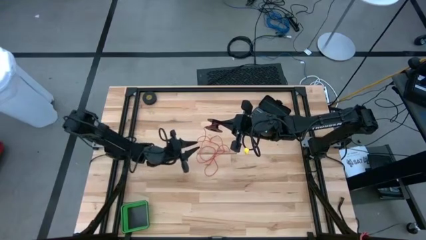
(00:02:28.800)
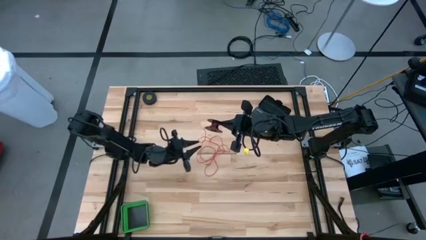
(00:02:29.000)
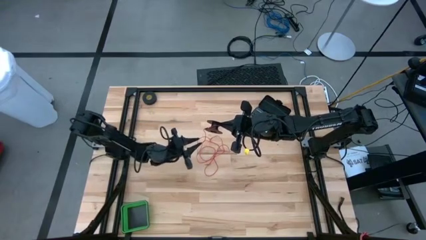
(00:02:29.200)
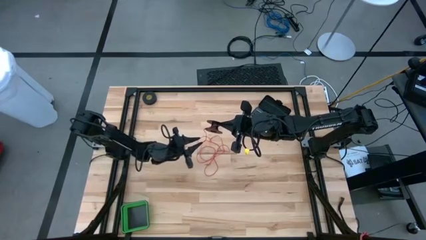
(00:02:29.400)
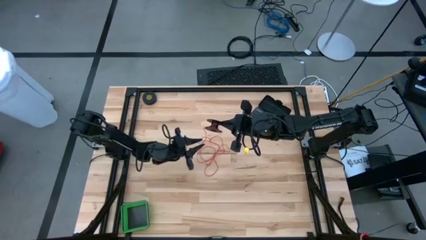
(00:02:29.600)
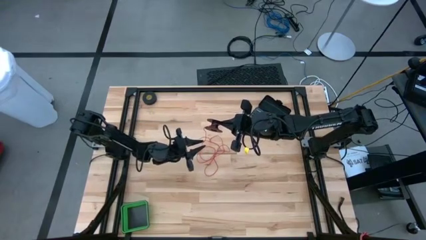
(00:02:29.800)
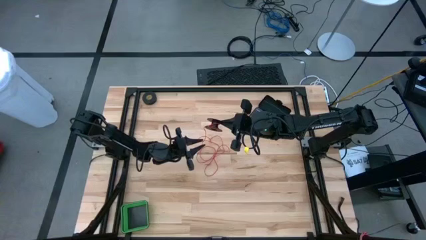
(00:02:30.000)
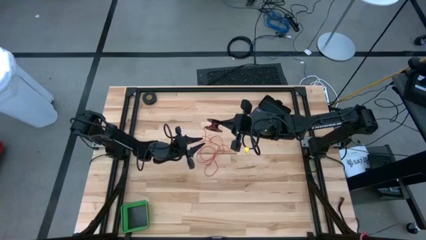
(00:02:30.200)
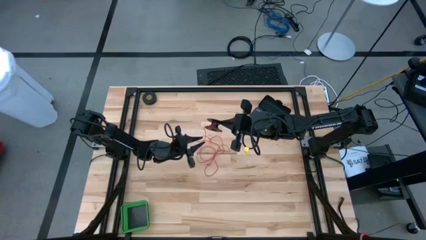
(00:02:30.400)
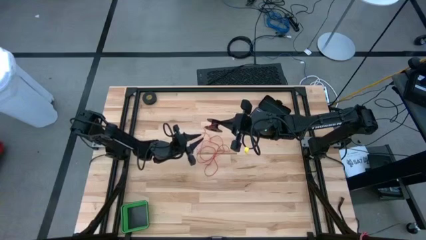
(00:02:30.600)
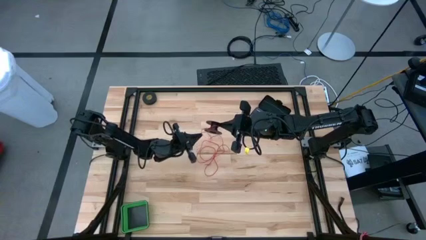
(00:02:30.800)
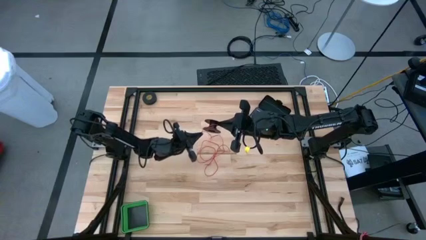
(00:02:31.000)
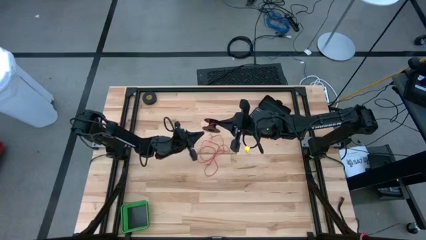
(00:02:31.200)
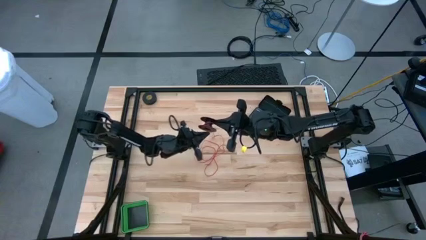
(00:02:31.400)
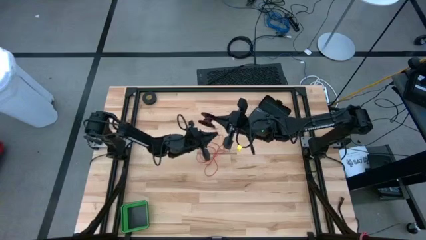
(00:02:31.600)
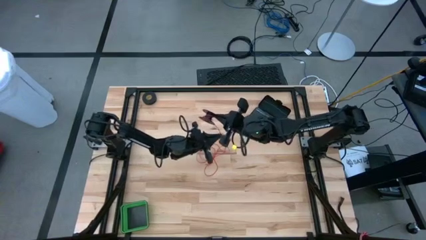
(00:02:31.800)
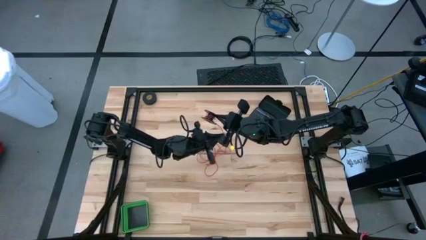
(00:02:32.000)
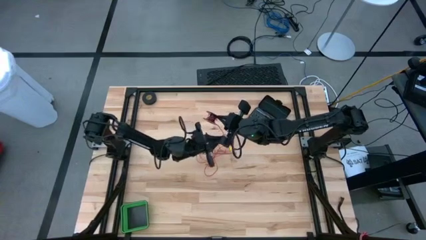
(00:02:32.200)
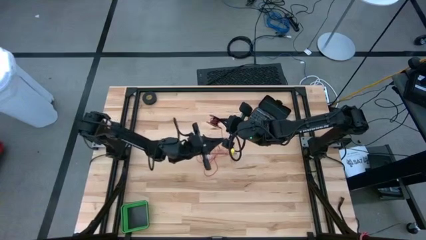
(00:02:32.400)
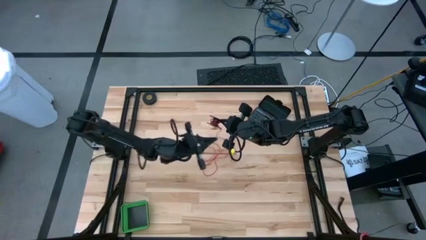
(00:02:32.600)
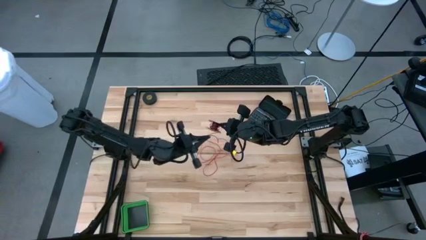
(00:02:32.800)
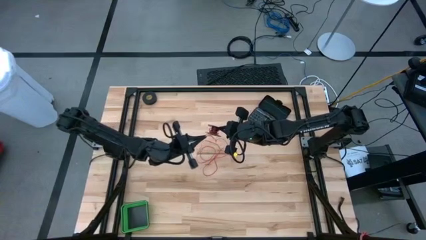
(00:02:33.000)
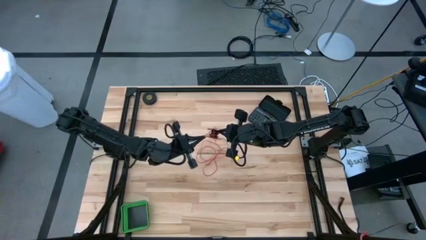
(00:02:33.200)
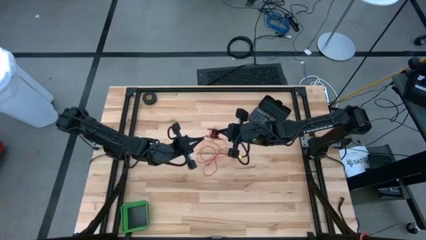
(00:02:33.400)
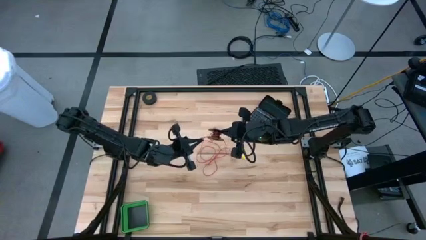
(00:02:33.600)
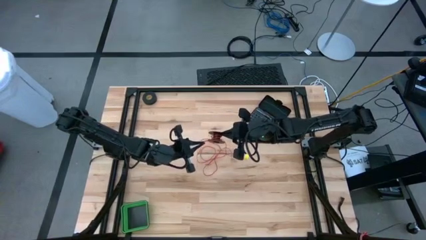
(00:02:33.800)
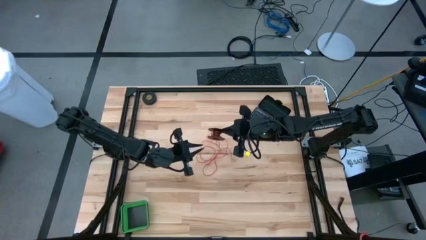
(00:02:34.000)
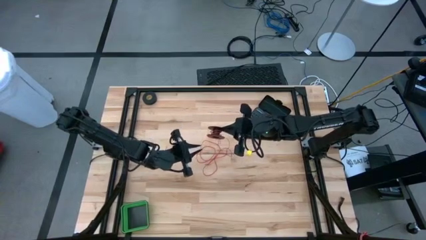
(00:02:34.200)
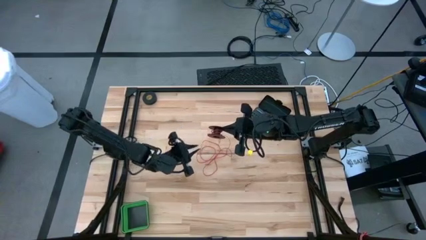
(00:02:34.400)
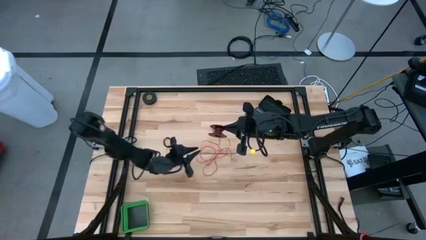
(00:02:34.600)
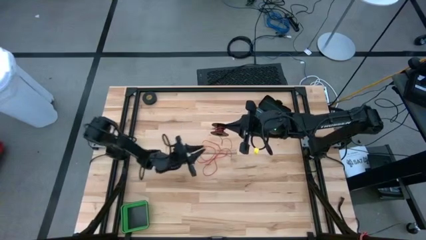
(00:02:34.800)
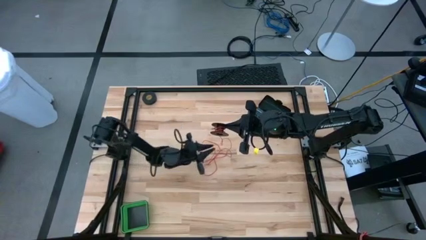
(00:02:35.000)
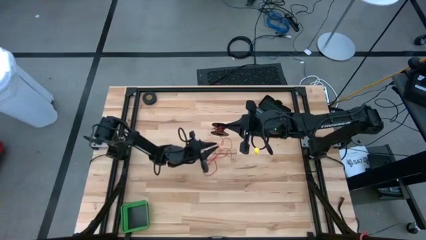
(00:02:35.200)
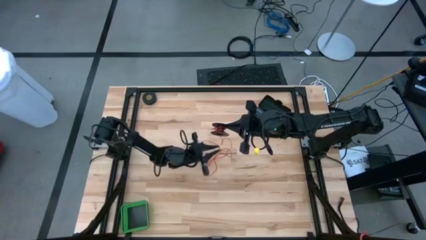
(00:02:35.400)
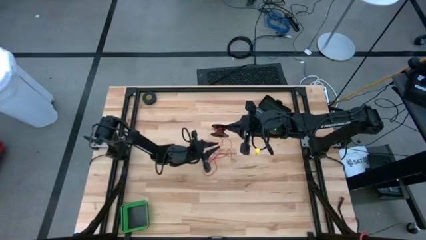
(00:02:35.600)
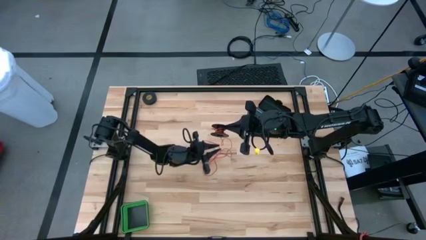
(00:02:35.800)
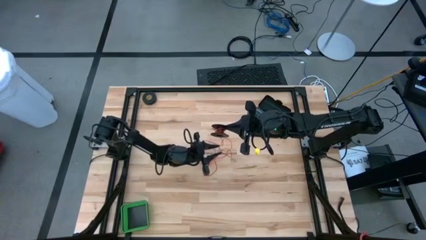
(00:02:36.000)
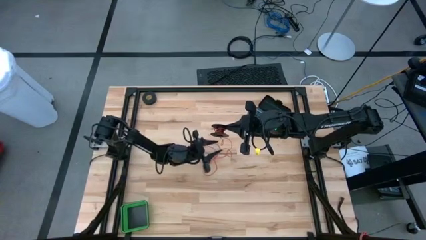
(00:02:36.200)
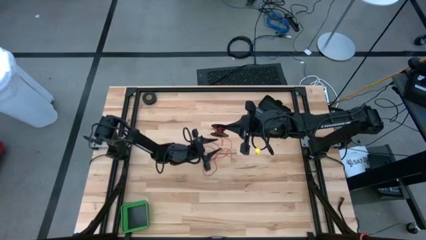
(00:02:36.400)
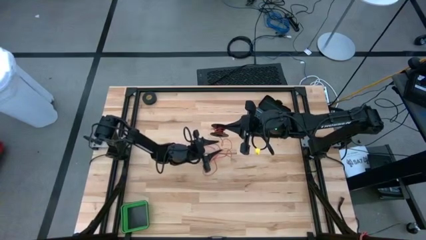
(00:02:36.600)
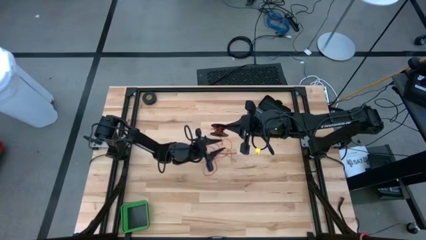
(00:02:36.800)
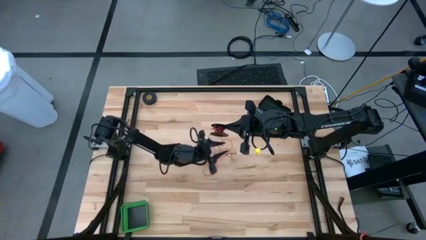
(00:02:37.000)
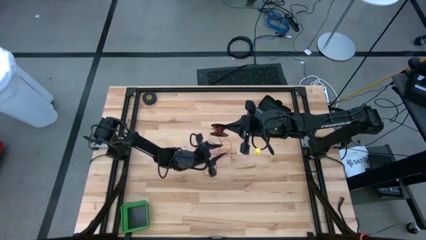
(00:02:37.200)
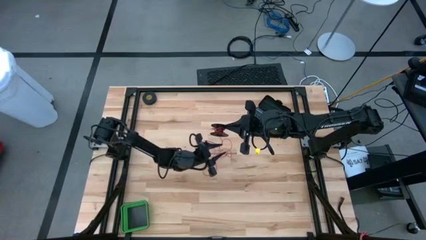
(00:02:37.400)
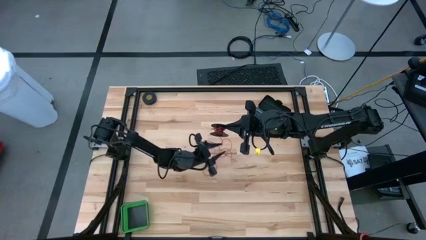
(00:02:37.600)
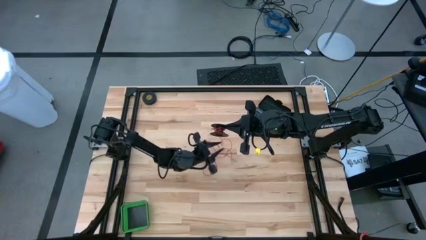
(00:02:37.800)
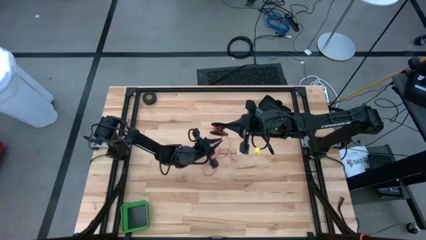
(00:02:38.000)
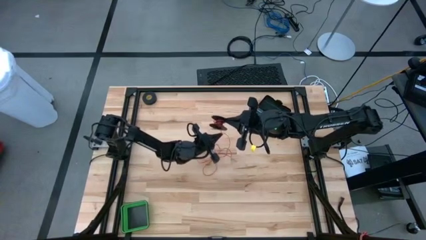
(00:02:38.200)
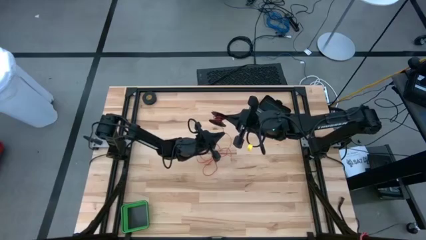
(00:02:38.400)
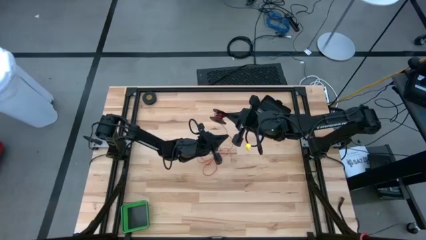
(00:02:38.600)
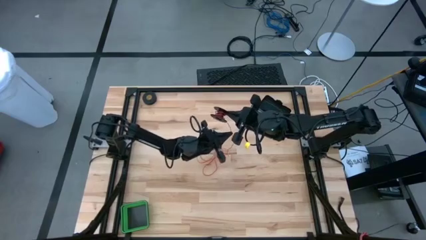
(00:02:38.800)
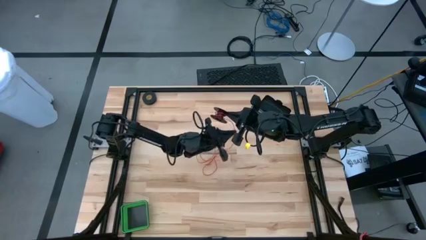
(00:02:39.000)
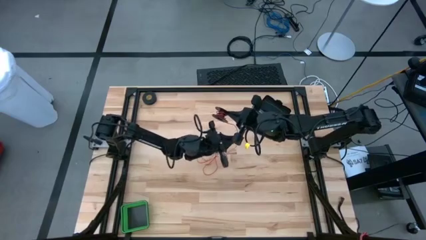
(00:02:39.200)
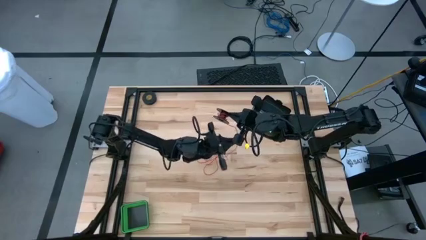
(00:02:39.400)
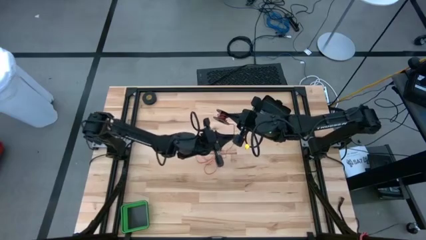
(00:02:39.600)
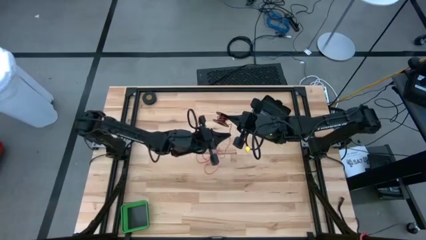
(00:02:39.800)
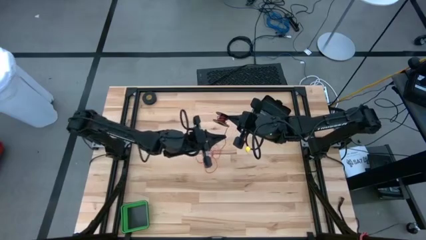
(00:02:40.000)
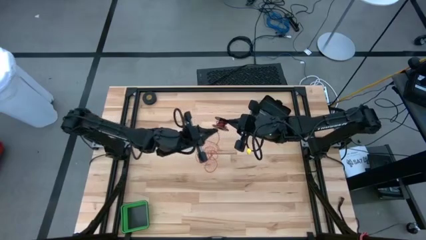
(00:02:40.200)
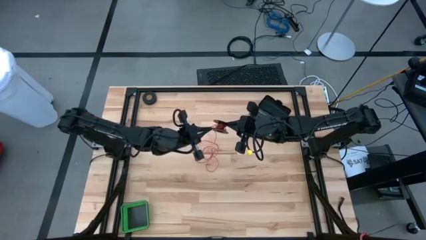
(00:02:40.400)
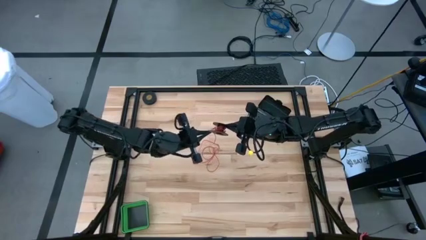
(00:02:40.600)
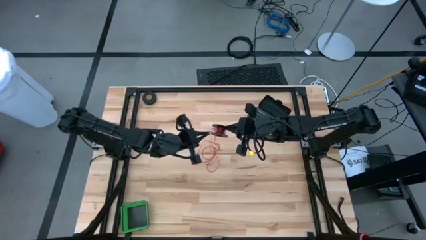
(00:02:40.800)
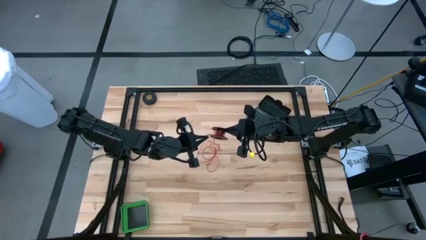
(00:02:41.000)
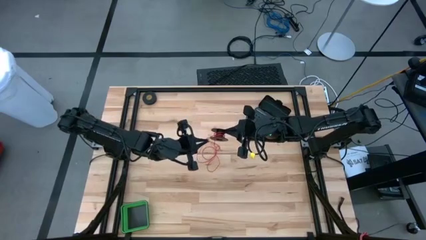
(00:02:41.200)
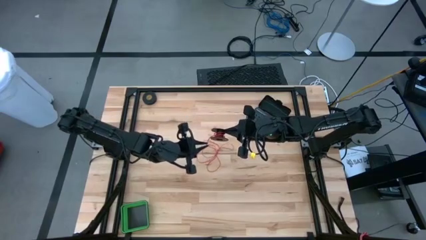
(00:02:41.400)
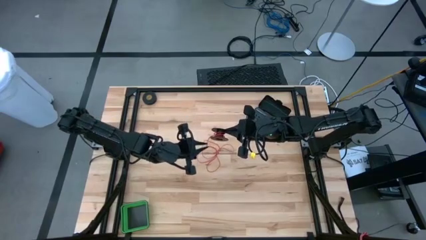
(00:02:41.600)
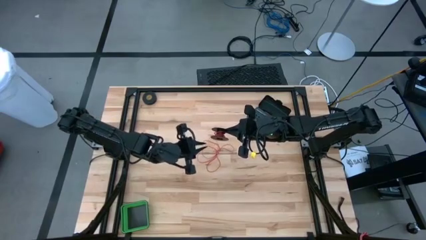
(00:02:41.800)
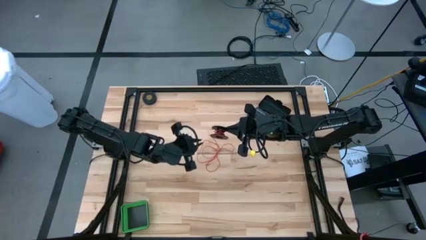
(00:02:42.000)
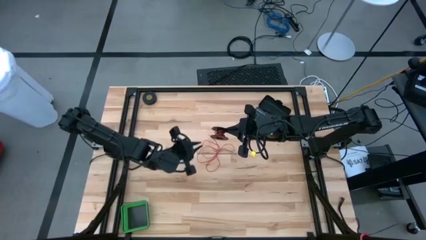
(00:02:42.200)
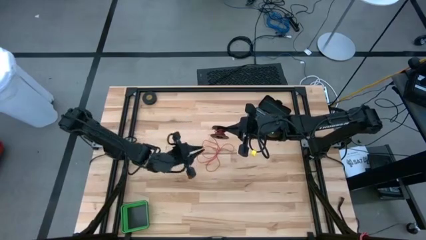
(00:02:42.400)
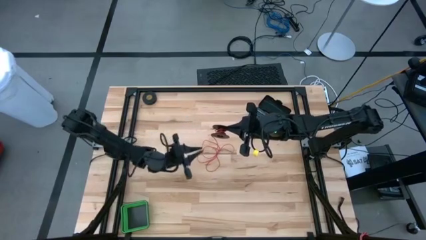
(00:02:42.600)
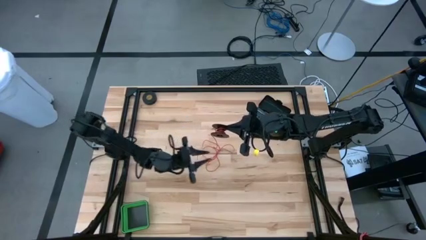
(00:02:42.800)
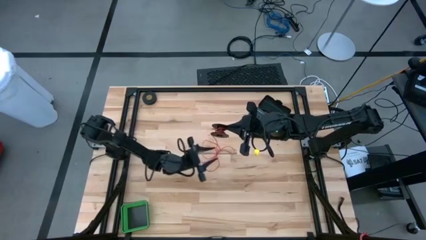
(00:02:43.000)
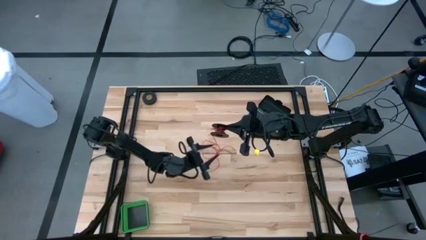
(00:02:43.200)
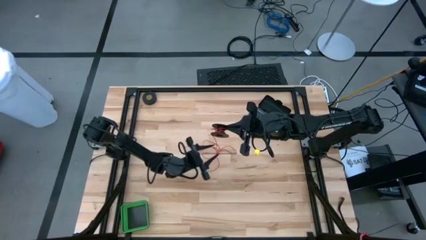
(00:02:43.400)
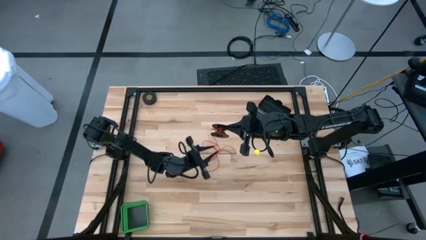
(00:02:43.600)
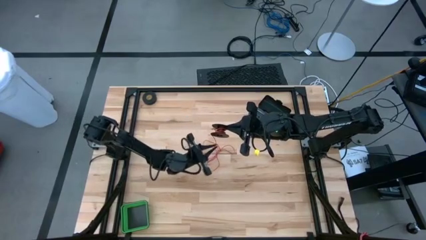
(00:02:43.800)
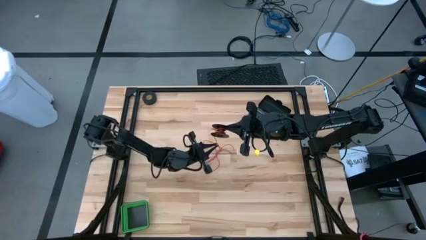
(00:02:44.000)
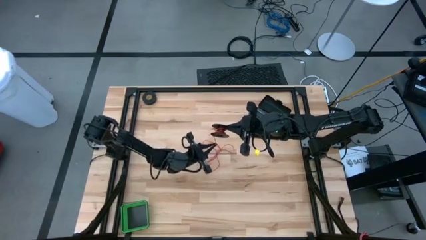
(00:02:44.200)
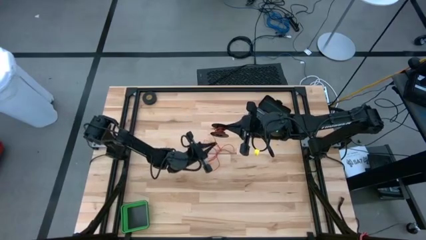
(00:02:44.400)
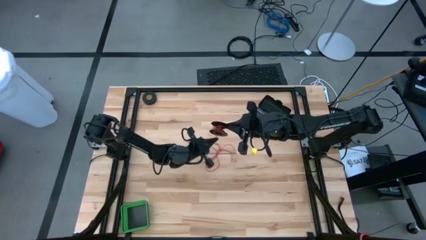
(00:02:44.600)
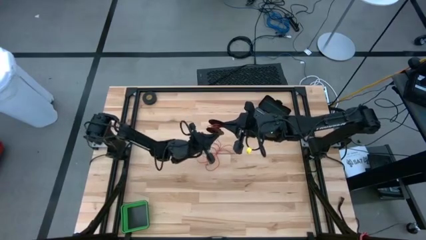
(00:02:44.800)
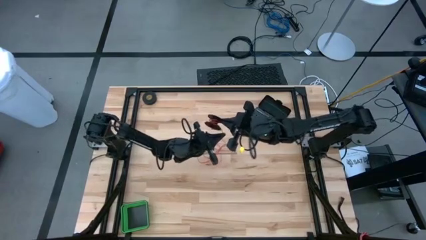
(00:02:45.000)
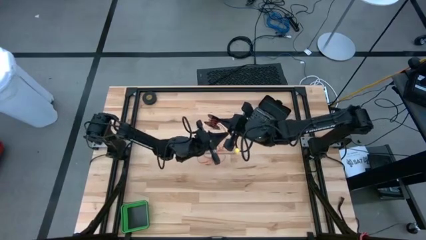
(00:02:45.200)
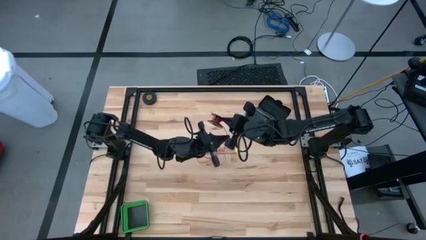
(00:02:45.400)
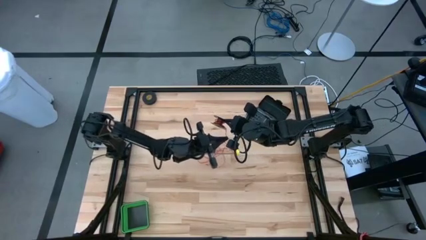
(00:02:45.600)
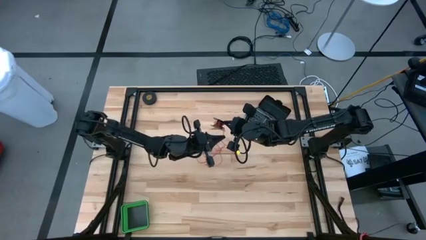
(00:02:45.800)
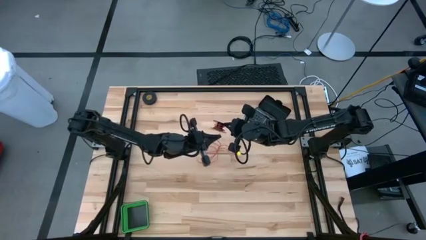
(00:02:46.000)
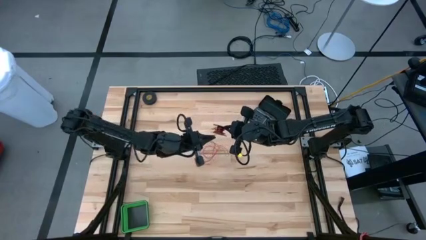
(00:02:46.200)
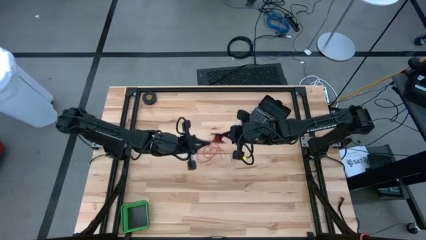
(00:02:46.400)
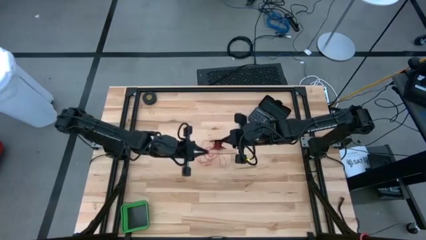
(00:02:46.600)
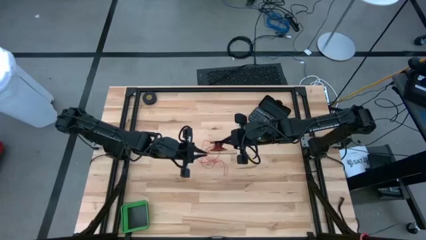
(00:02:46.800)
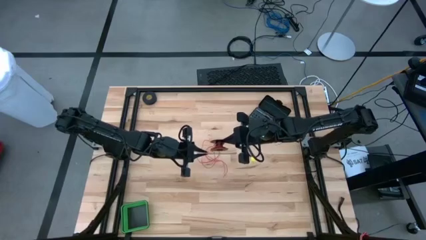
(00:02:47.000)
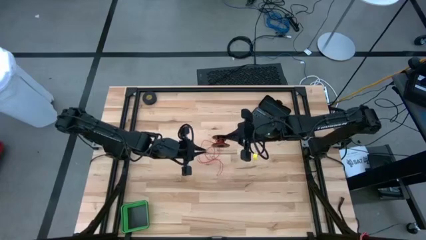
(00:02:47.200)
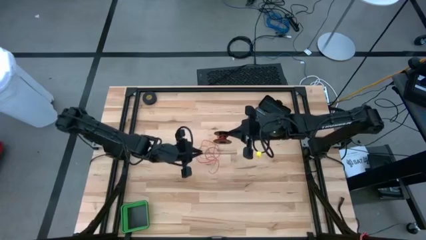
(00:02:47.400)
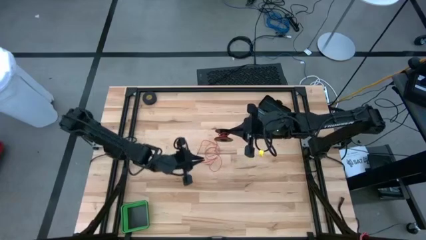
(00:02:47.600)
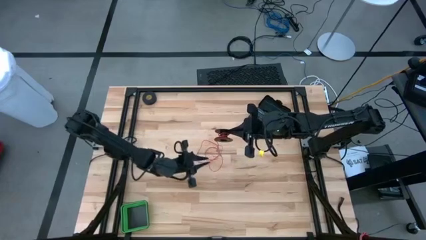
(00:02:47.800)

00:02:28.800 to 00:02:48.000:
Task: Coil cords
Coil the red wire into the spool
